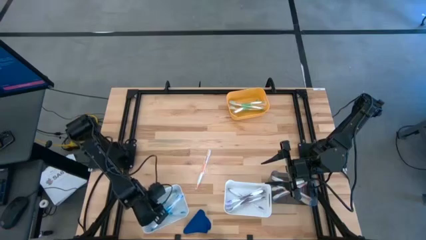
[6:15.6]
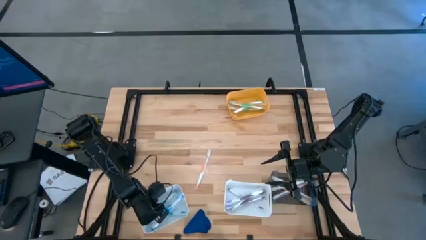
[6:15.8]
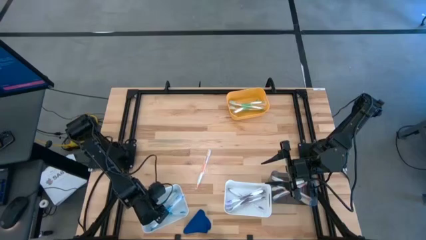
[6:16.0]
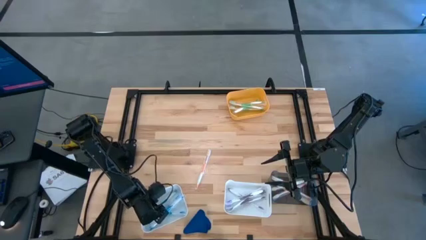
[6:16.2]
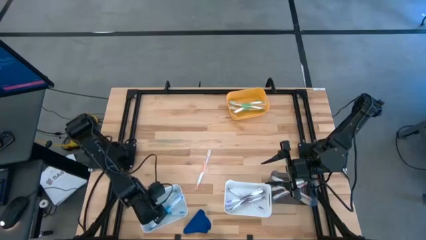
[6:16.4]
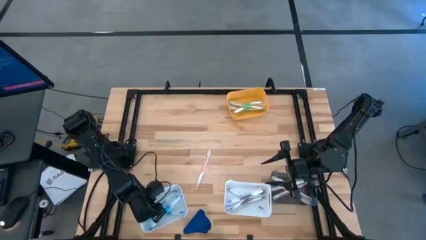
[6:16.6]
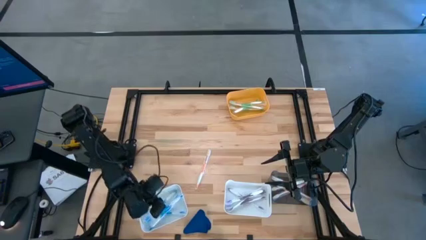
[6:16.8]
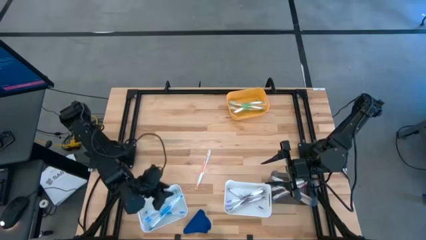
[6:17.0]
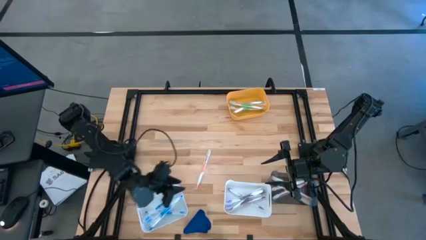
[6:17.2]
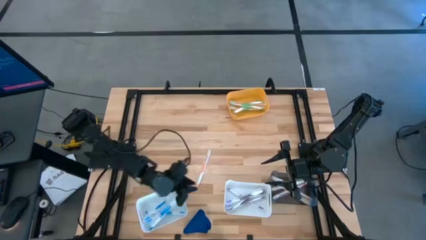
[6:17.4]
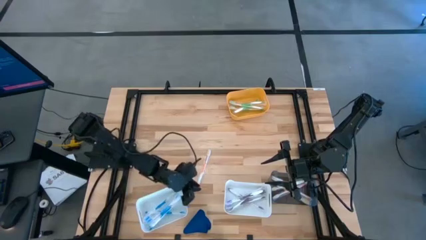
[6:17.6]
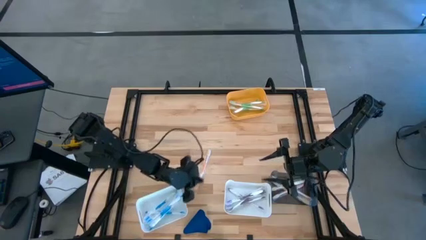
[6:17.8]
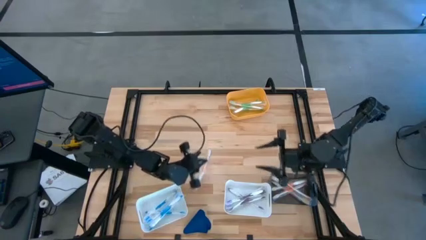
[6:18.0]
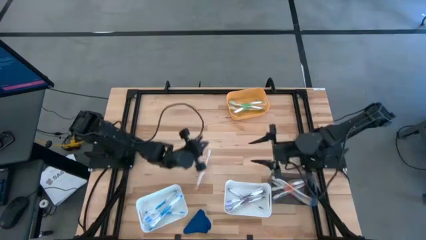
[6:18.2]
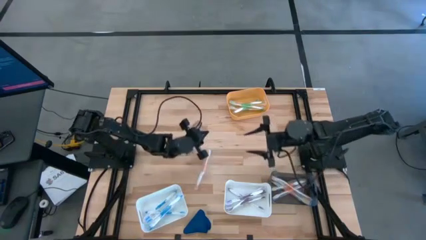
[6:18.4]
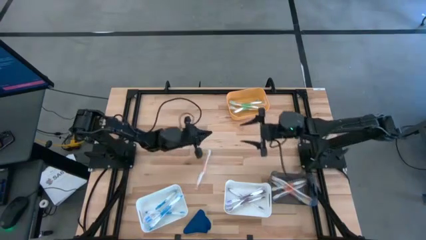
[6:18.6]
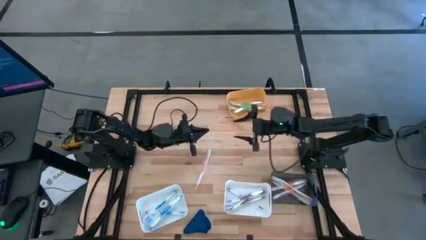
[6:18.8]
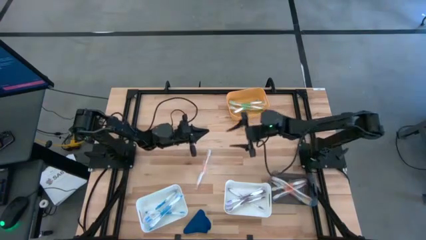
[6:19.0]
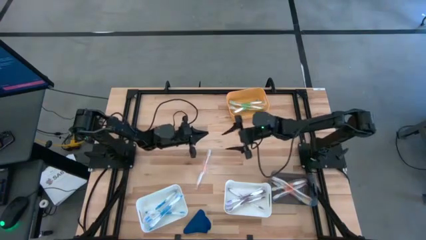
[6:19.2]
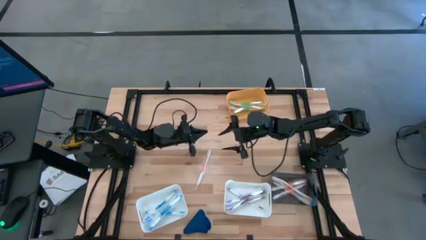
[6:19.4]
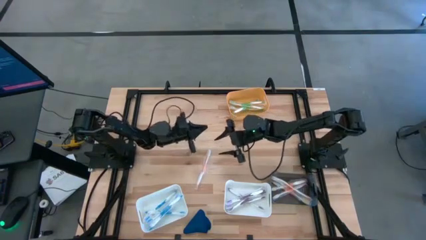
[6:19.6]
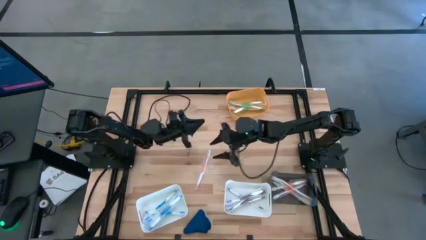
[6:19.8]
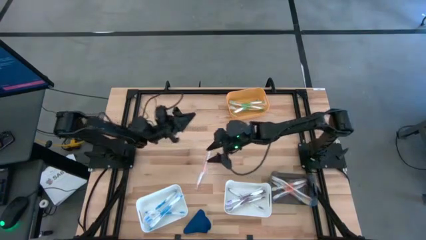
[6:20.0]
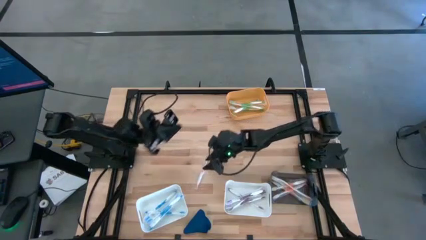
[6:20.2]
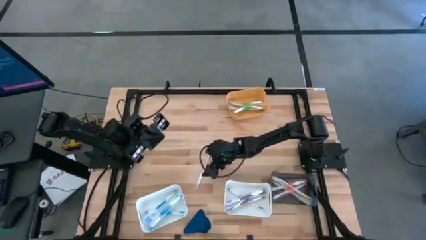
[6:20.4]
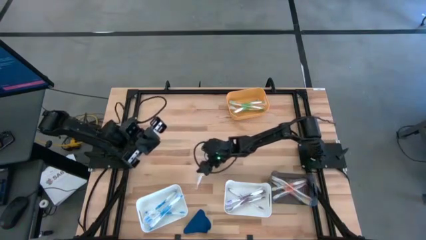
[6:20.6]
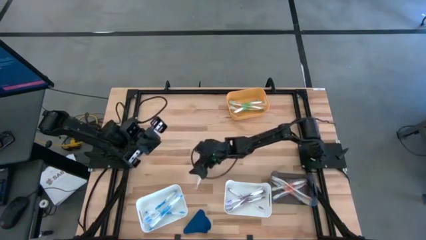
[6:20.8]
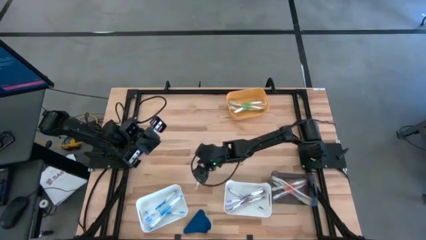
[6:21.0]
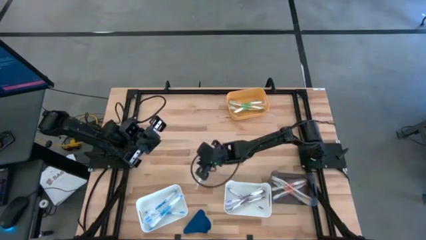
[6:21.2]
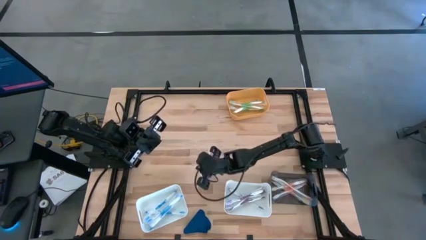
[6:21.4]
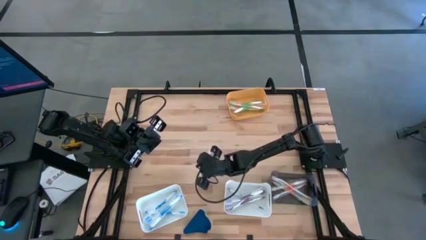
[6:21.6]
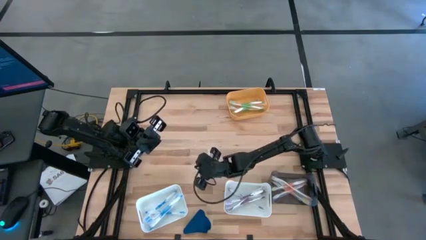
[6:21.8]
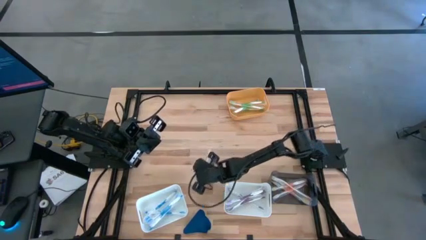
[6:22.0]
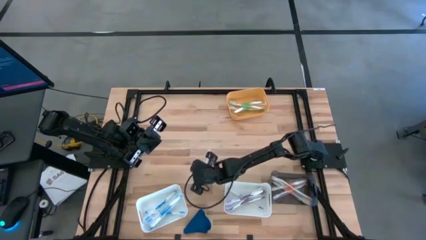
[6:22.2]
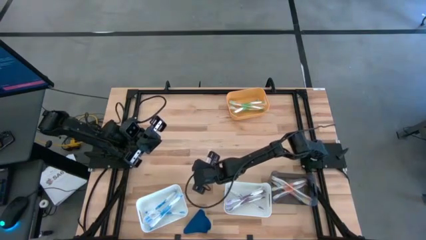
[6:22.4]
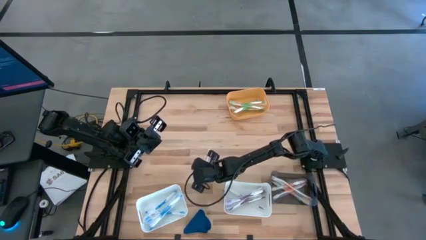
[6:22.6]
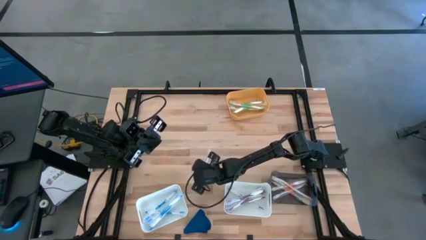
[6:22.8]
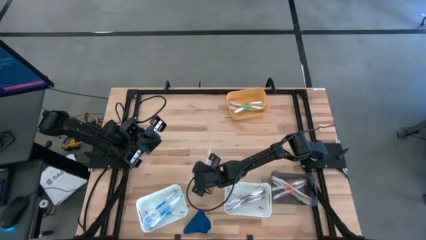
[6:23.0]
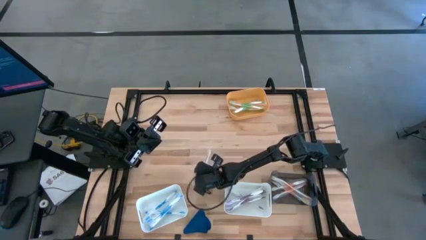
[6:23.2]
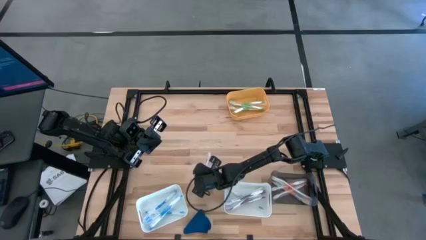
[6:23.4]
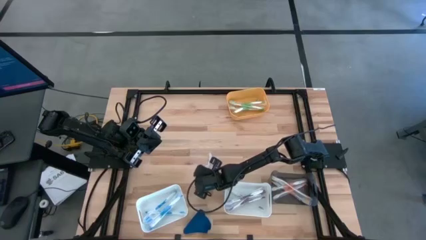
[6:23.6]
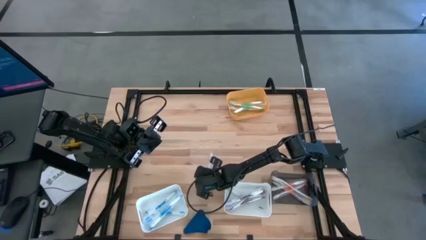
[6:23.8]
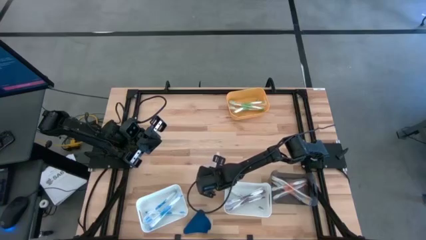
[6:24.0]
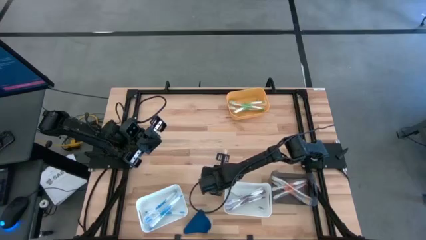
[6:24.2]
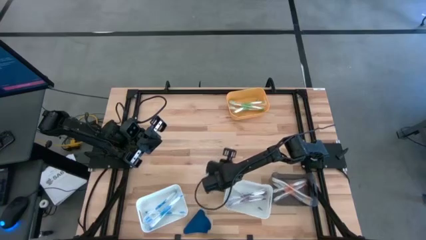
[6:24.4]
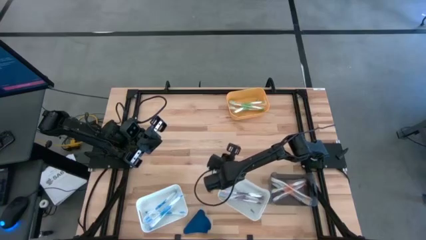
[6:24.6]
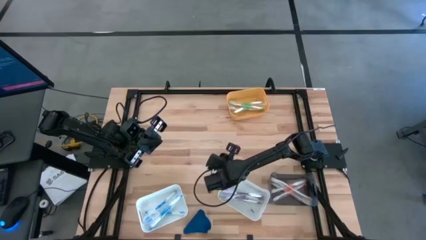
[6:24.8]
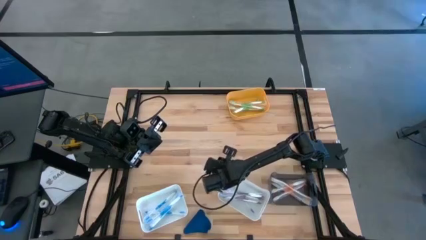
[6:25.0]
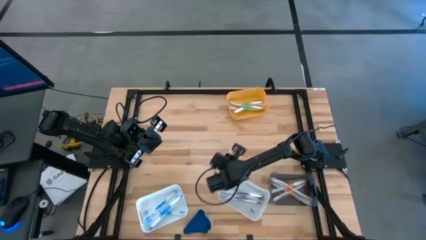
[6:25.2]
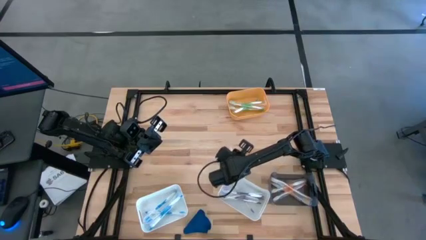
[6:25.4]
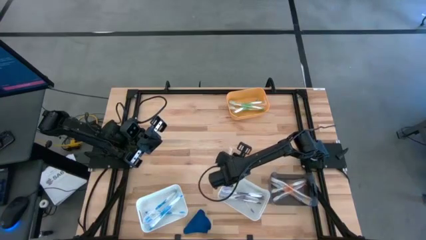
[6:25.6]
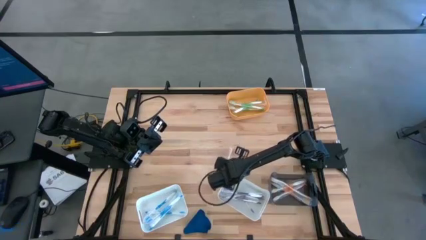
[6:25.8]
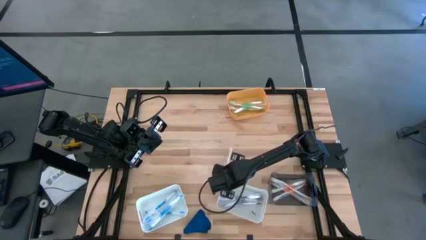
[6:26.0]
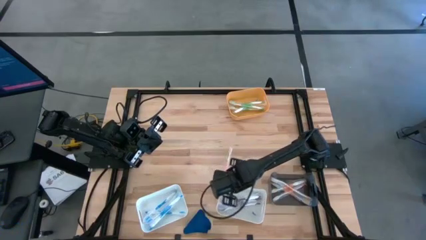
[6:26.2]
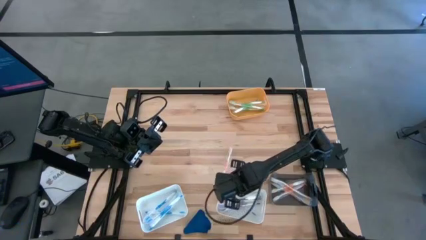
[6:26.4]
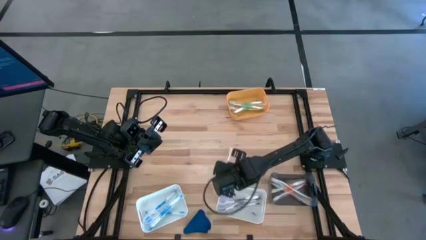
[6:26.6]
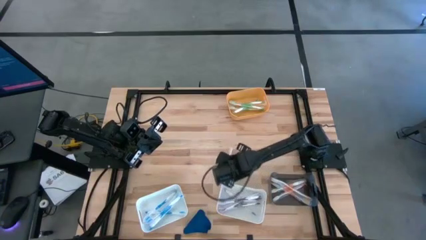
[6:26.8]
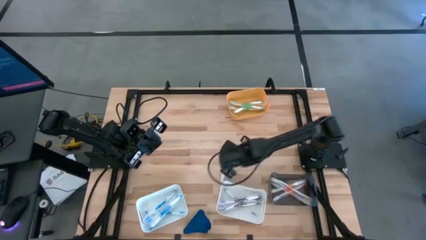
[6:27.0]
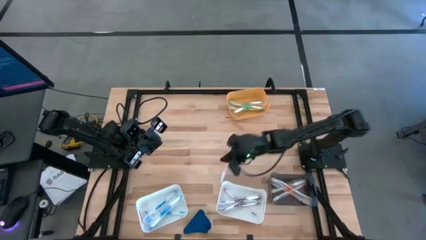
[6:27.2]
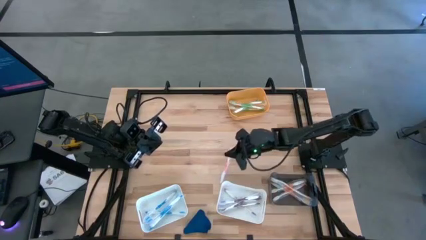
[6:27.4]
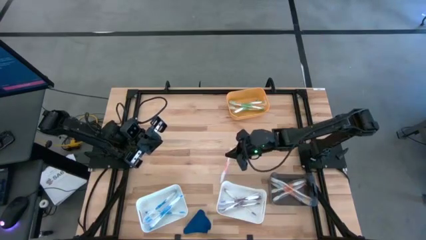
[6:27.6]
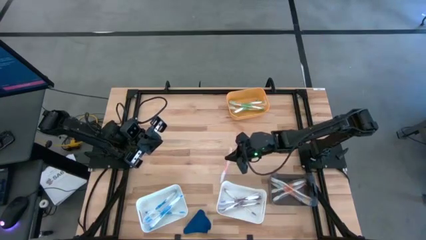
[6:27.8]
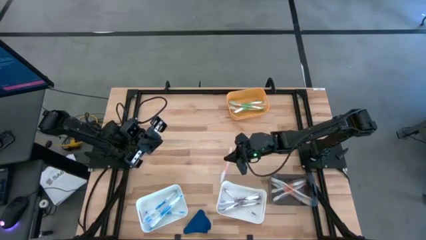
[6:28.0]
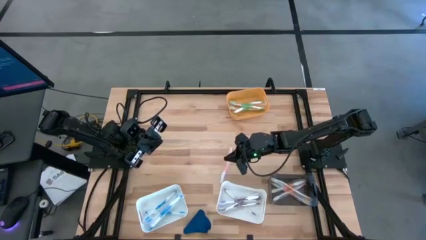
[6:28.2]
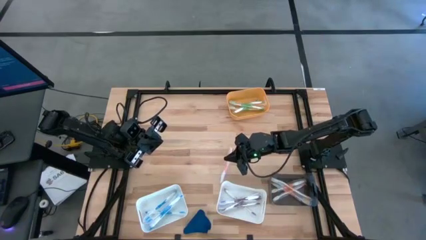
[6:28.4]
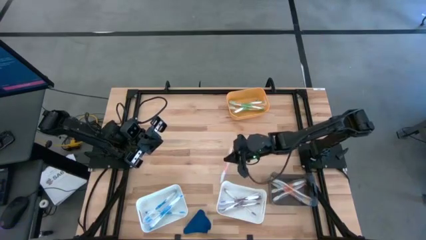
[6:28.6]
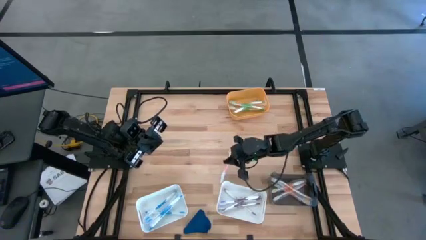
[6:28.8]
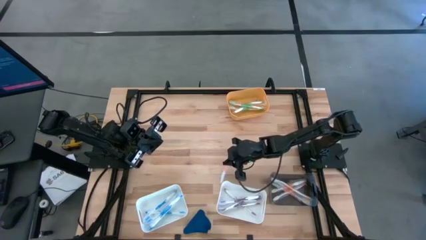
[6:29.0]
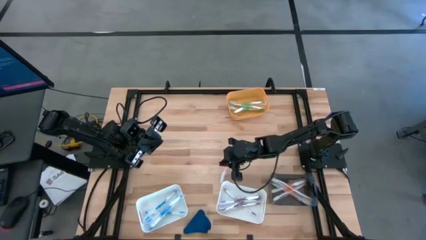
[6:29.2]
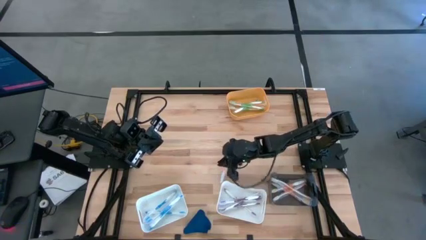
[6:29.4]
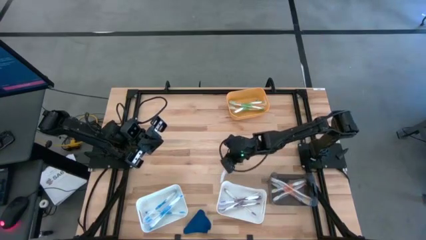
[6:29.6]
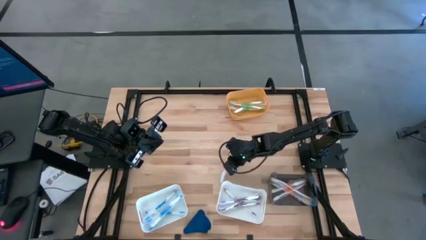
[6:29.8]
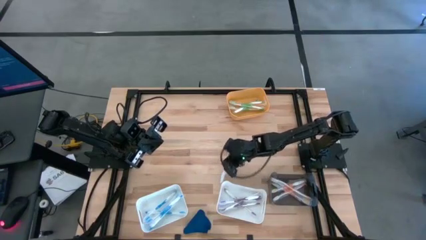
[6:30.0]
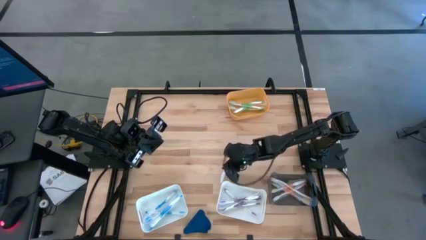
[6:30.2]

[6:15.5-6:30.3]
Task: Pick & Place Toothbrushes
Put the orange toothbrush into the black bin
